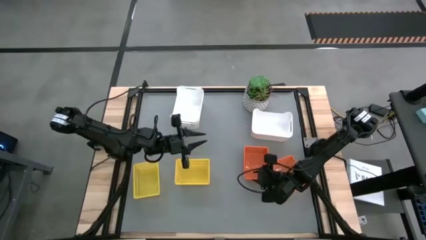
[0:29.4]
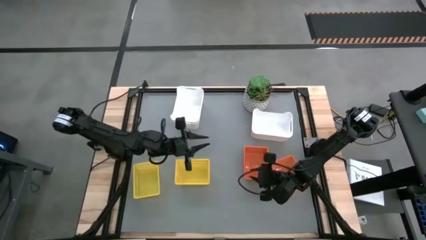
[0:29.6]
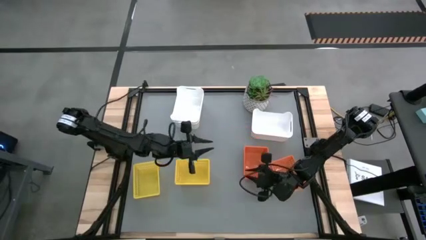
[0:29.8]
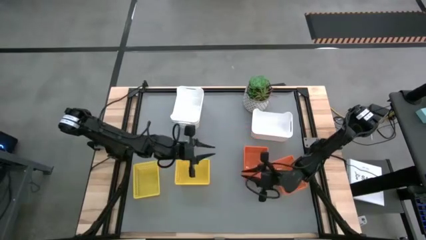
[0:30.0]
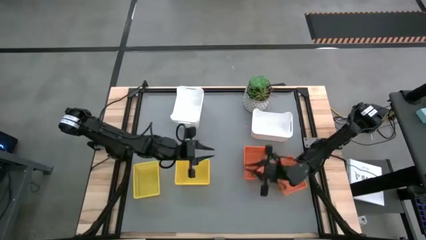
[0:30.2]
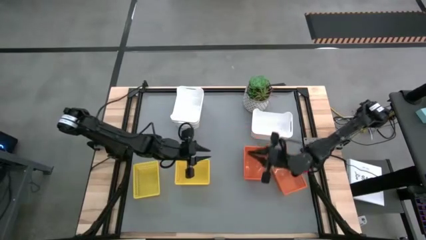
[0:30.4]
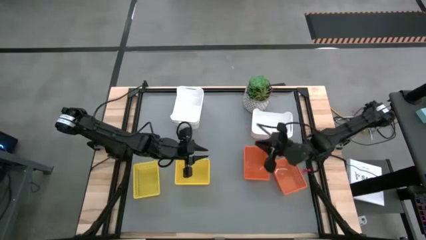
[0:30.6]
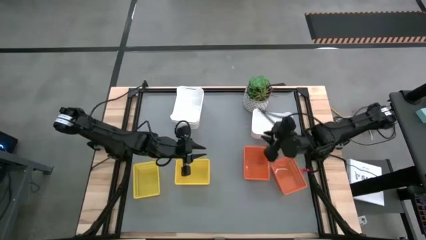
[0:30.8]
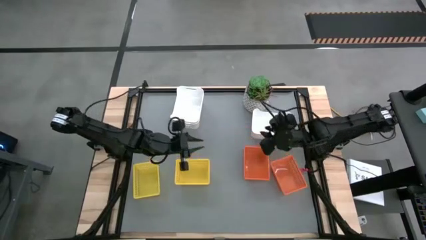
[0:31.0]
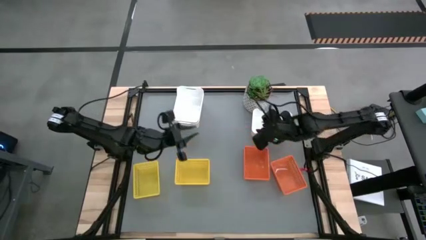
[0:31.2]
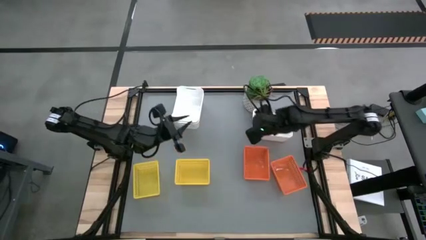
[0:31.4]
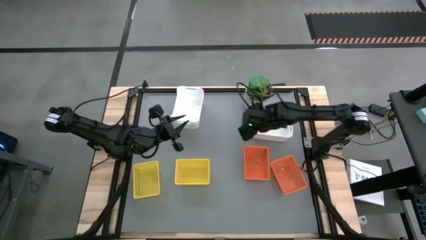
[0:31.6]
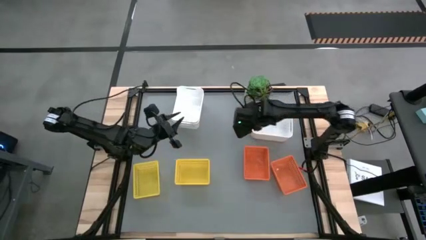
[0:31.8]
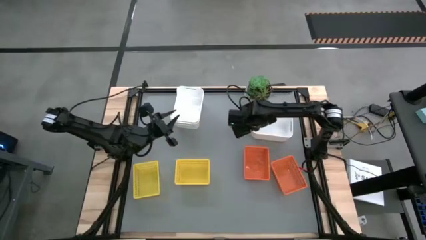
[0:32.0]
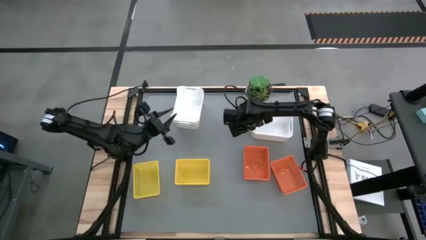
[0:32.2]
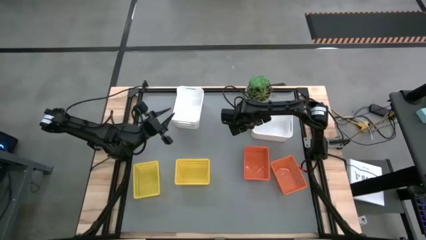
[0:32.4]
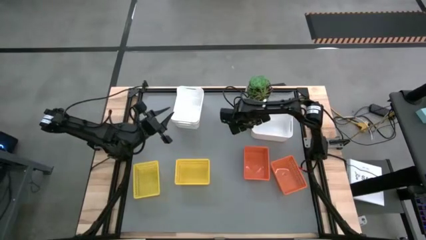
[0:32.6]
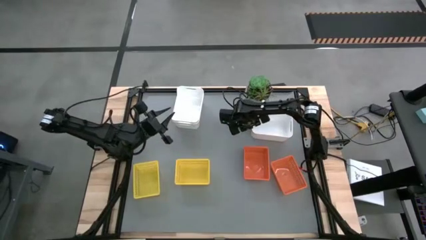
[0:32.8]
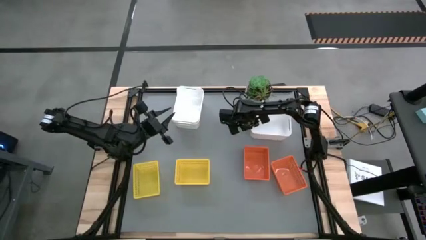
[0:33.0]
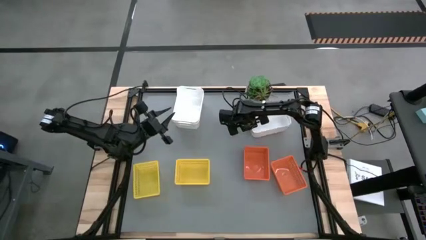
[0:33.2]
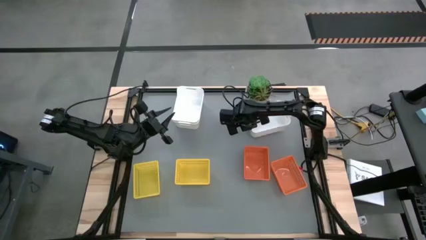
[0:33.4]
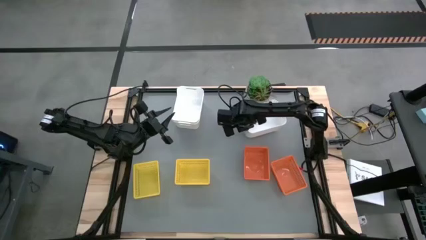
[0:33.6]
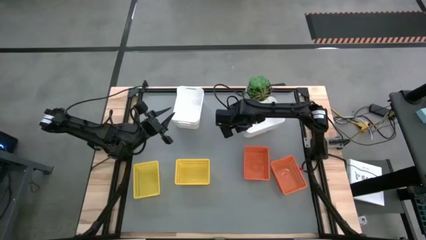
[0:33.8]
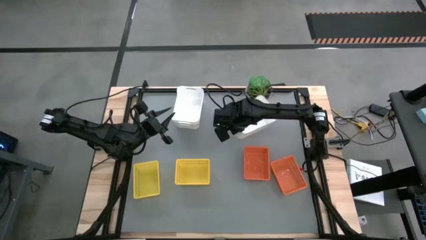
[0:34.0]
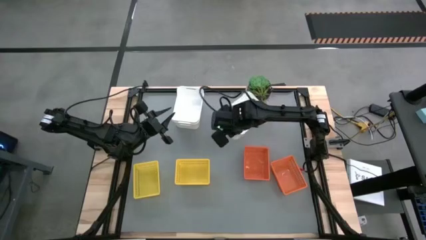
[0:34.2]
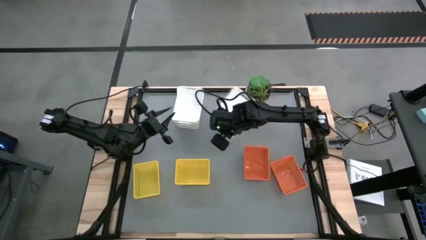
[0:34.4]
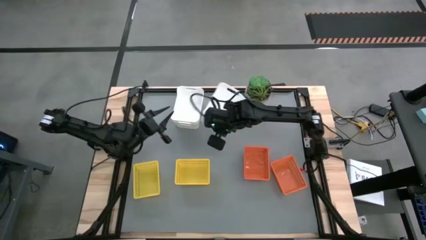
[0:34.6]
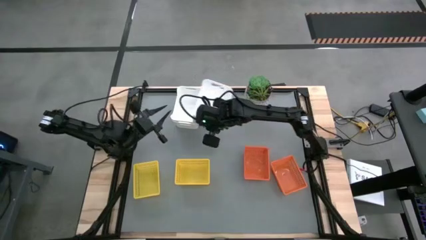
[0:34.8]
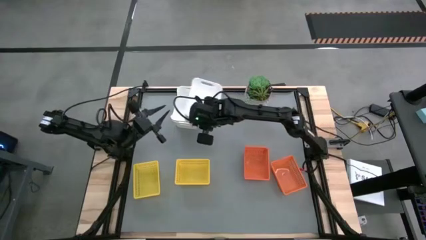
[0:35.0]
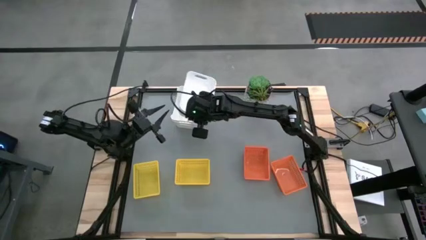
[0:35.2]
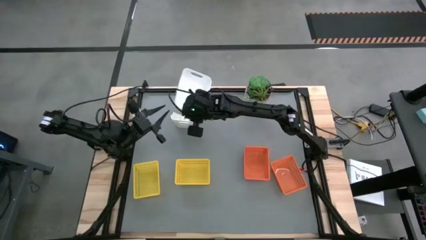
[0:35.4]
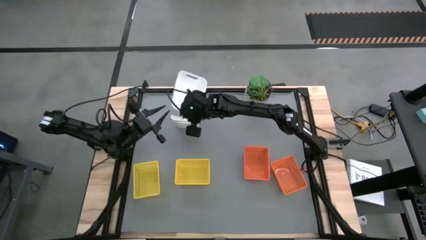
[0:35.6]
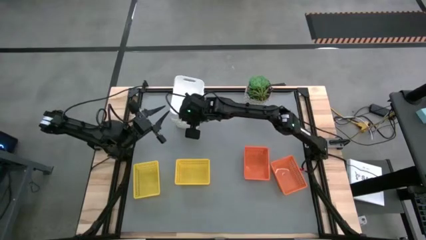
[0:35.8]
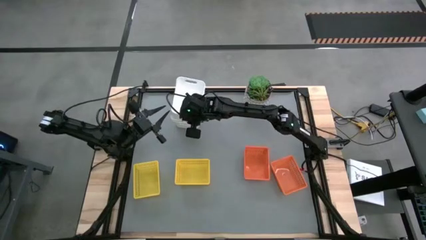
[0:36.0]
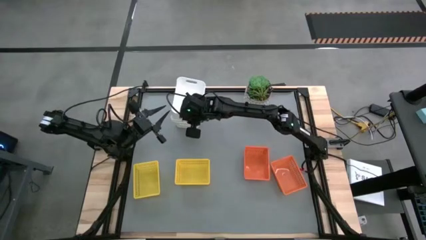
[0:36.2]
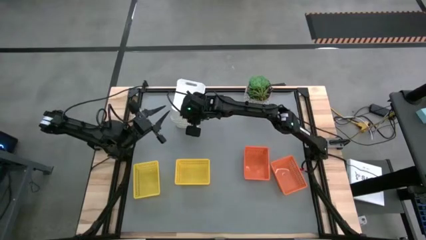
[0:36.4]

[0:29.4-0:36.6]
Stack the right white bin on the white bins

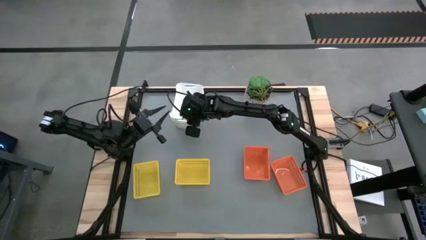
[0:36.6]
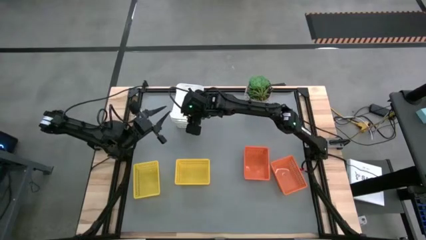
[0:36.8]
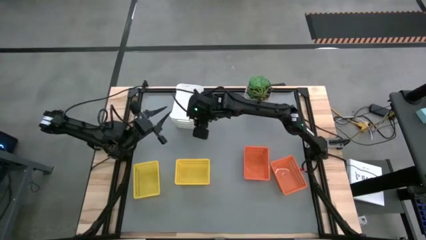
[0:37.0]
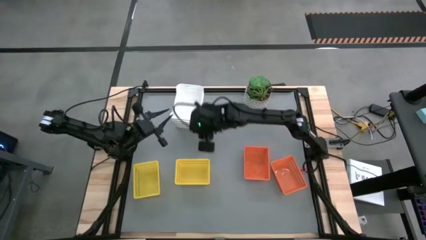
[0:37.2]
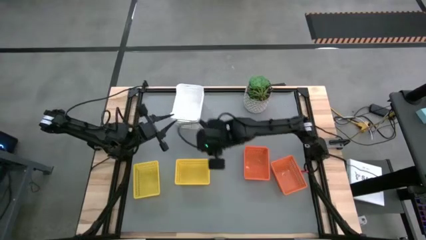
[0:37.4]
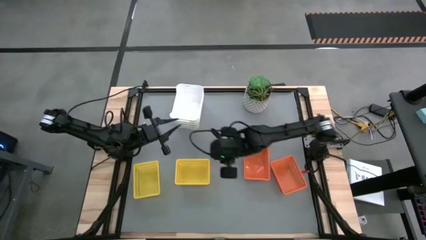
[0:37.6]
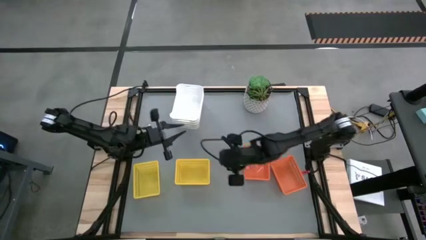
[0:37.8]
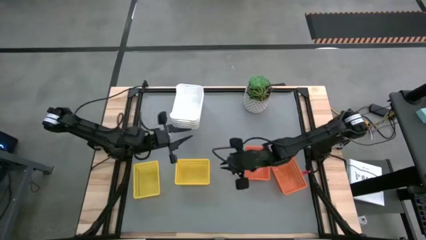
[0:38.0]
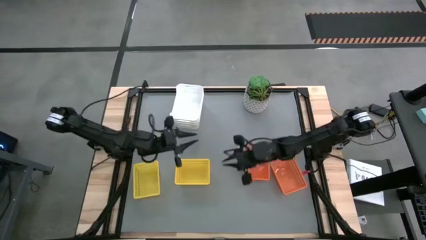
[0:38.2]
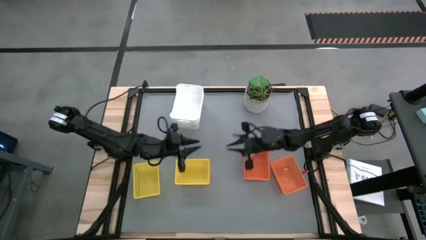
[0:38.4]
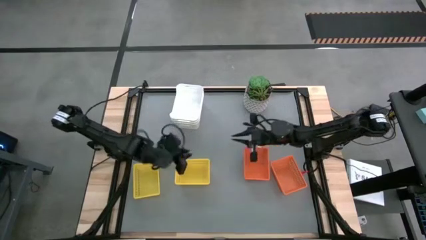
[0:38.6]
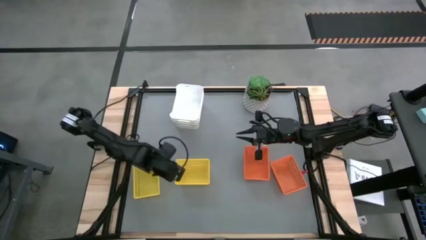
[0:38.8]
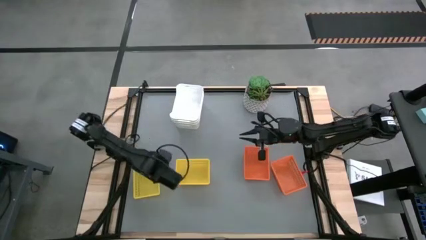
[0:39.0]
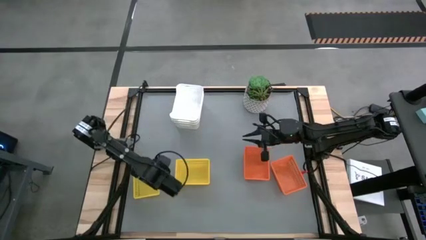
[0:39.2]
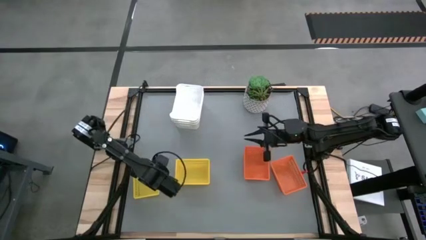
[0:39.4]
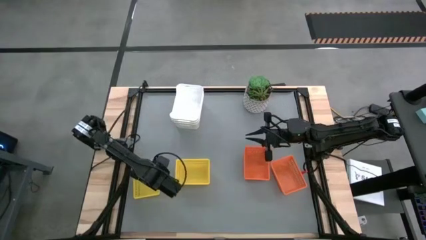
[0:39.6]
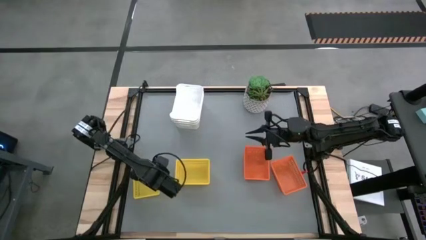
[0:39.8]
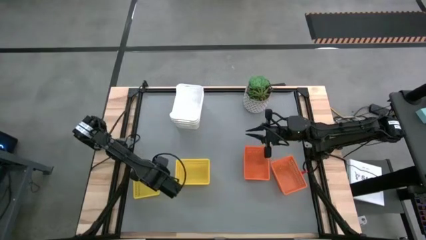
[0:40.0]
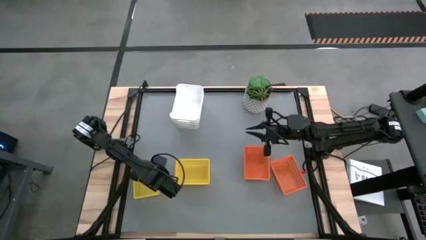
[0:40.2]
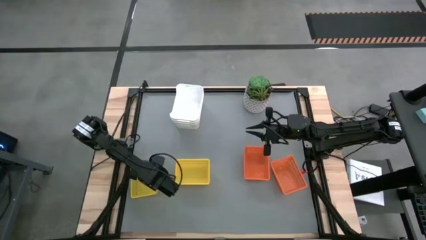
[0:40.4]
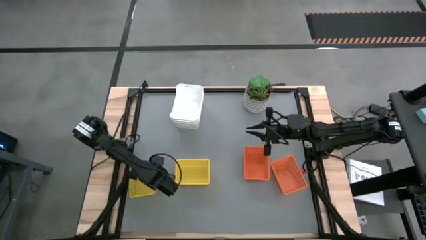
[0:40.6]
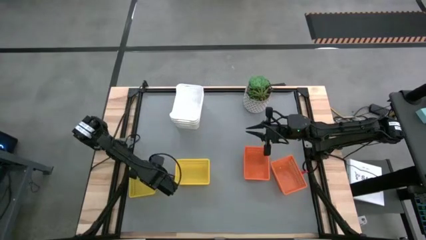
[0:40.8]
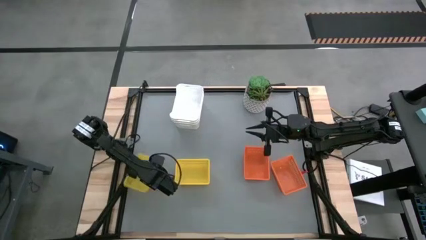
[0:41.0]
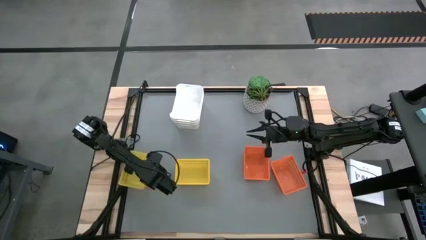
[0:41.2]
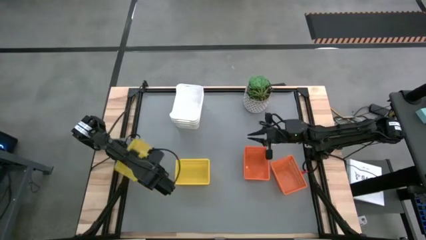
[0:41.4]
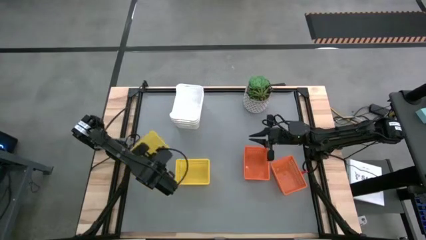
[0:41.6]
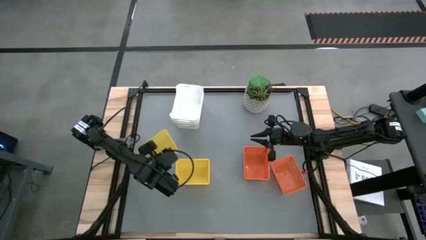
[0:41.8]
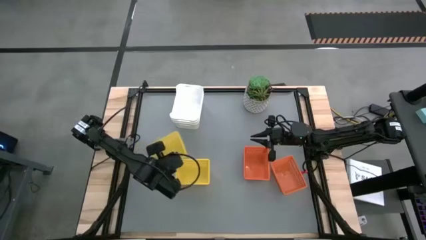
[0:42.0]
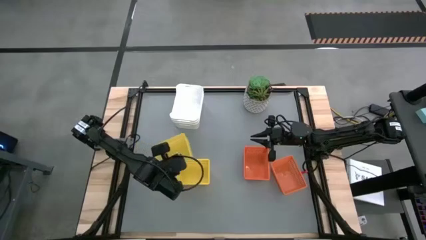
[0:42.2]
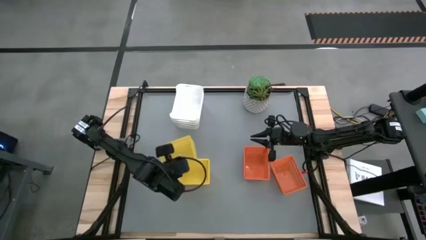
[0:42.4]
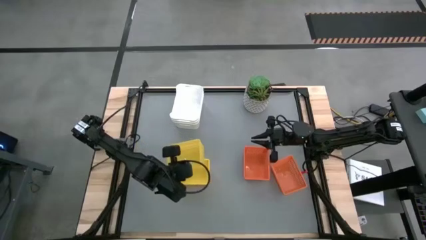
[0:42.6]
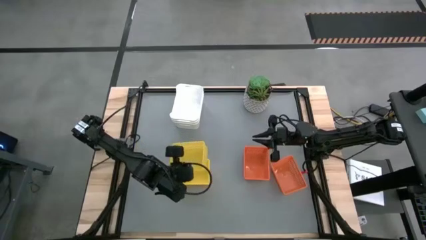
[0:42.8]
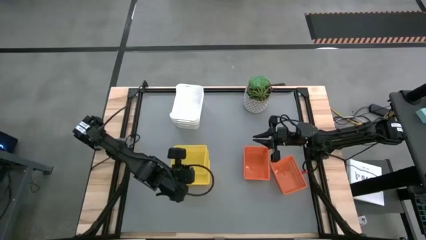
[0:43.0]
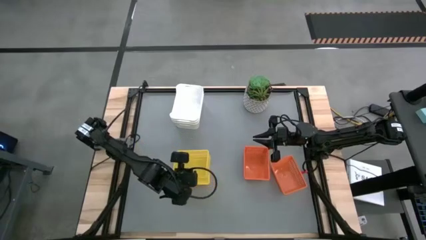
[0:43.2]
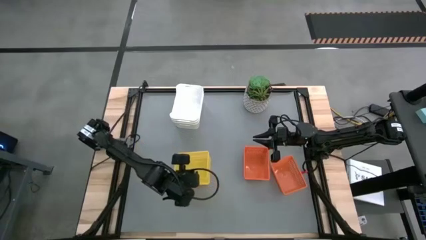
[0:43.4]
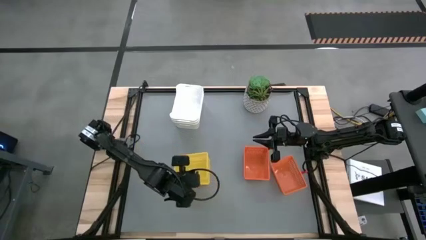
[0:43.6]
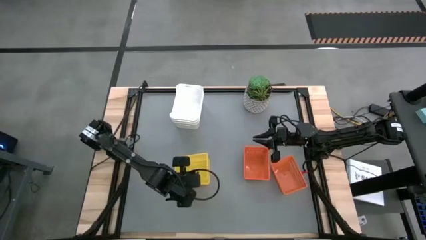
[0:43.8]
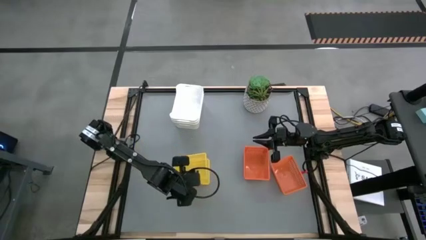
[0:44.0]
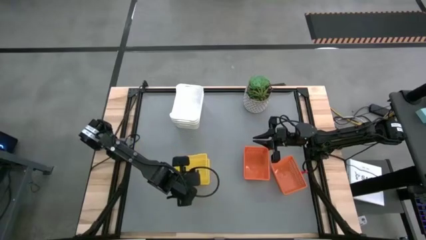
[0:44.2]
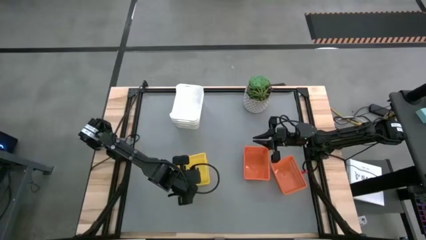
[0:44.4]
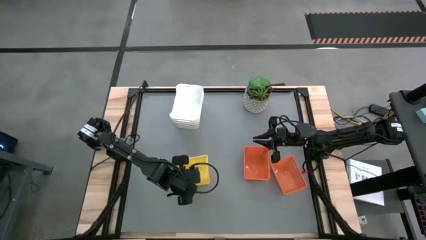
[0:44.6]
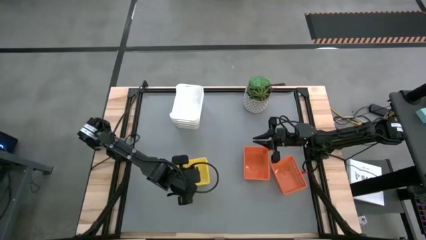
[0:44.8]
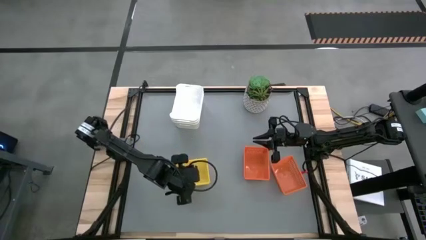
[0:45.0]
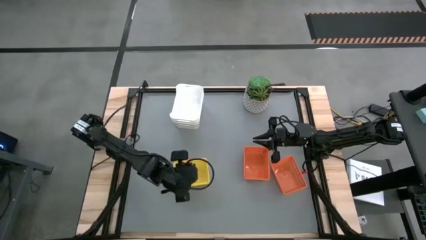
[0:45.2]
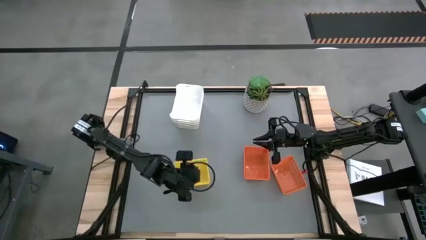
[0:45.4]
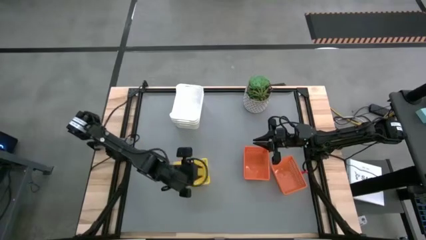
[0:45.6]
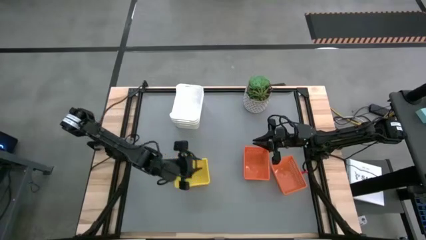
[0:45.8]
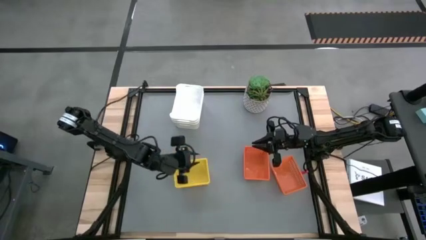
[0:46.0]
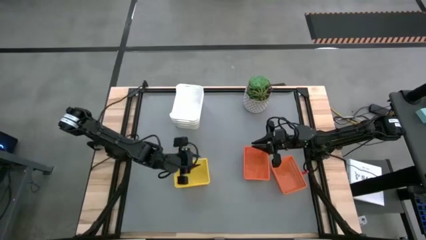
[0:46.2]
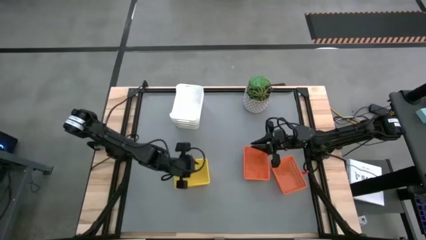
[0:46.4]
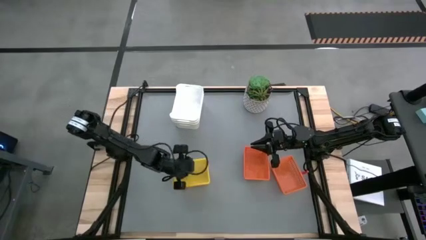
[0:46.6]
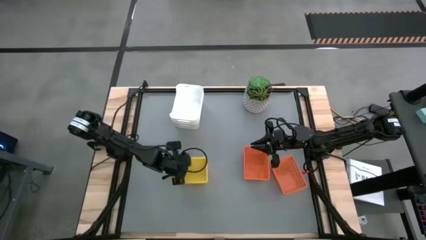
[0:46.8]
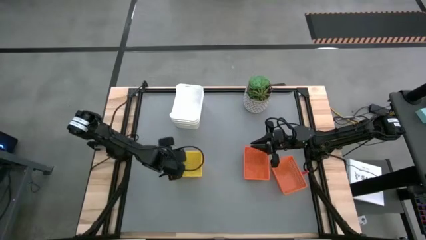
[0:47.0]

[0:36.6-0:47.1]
Stack the left yellow bin on the yellow bins
